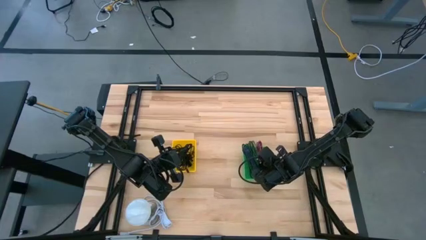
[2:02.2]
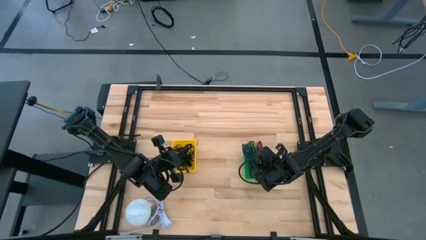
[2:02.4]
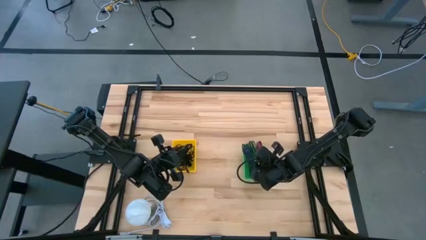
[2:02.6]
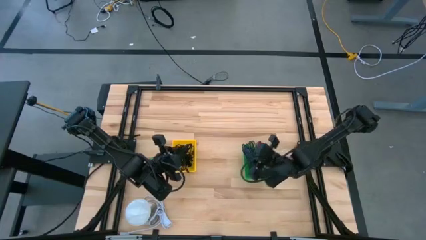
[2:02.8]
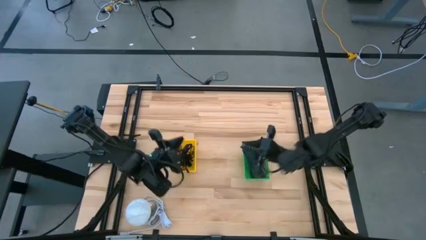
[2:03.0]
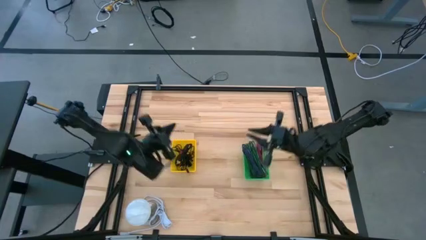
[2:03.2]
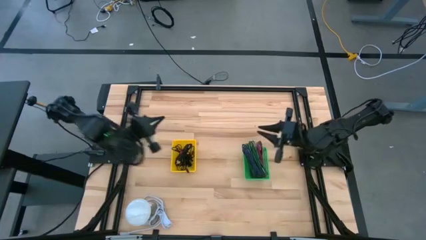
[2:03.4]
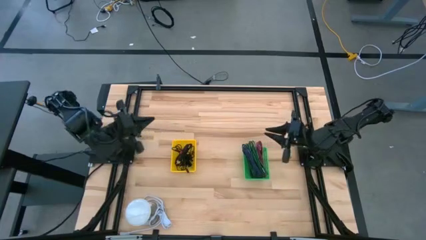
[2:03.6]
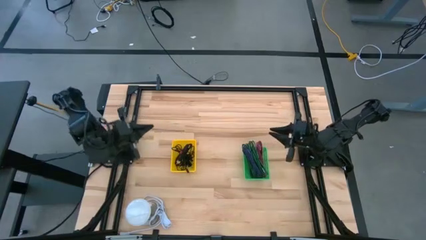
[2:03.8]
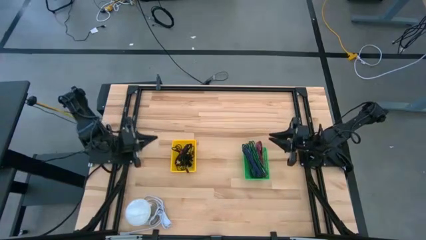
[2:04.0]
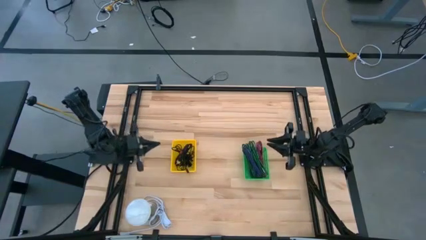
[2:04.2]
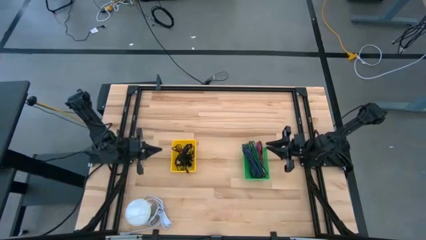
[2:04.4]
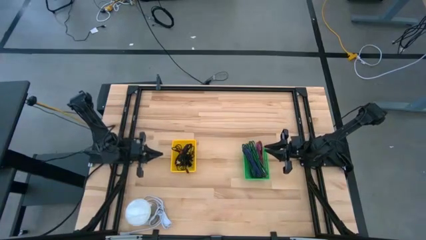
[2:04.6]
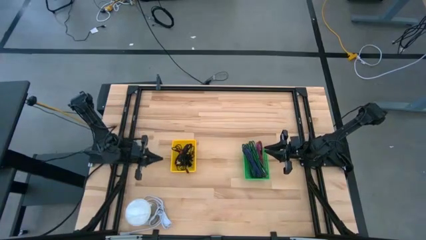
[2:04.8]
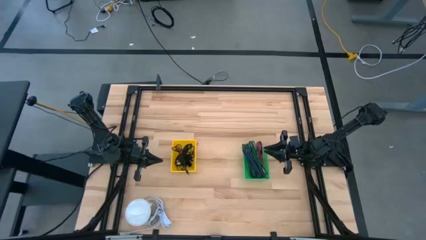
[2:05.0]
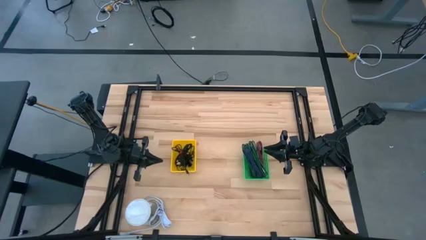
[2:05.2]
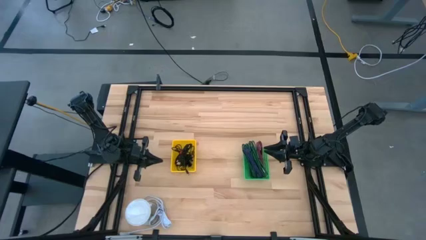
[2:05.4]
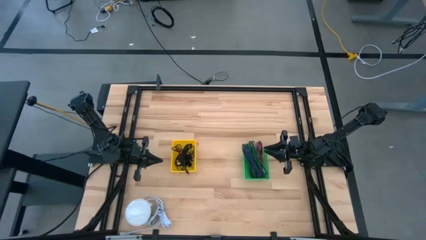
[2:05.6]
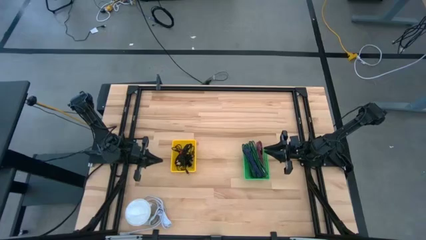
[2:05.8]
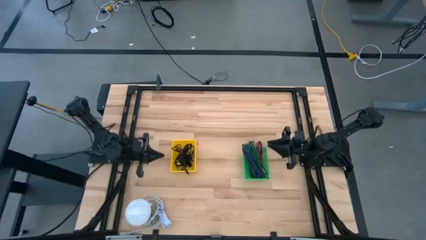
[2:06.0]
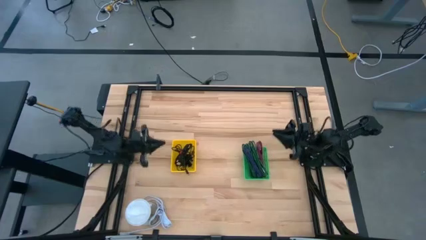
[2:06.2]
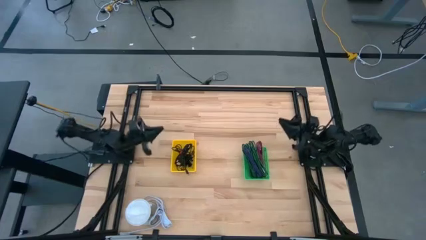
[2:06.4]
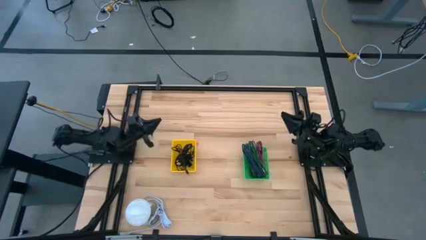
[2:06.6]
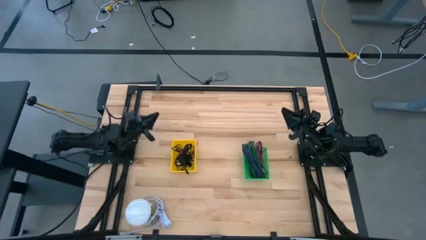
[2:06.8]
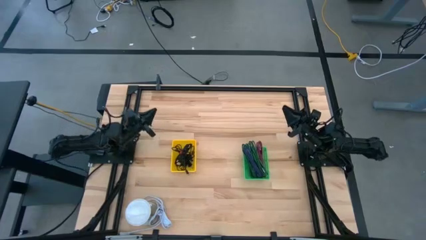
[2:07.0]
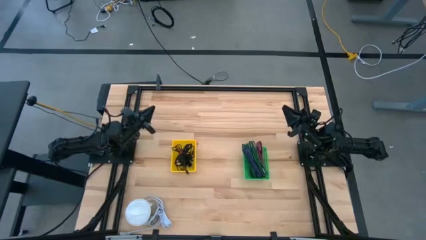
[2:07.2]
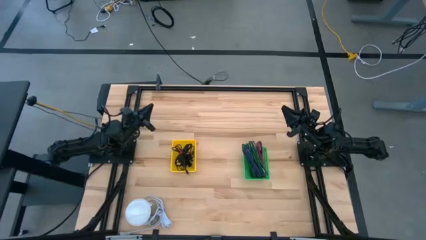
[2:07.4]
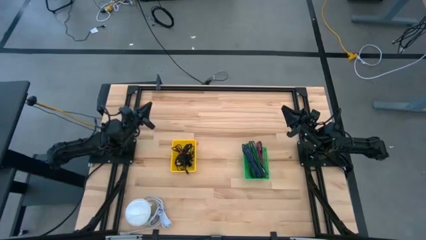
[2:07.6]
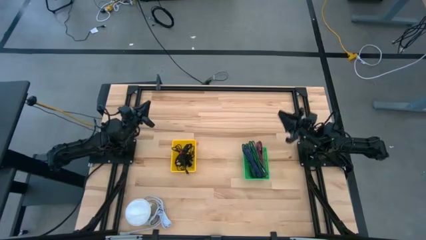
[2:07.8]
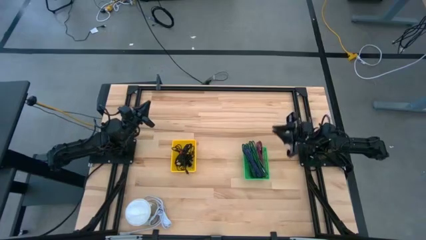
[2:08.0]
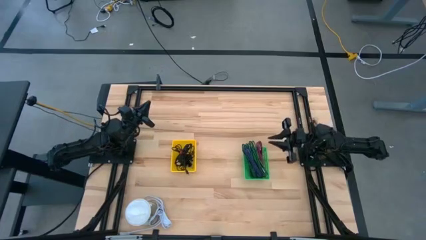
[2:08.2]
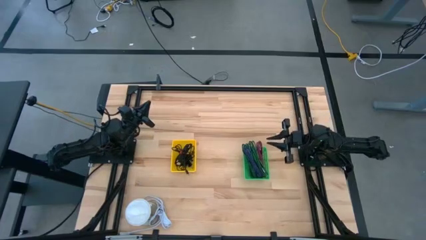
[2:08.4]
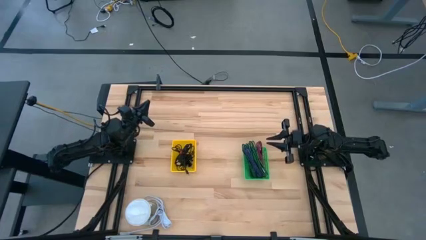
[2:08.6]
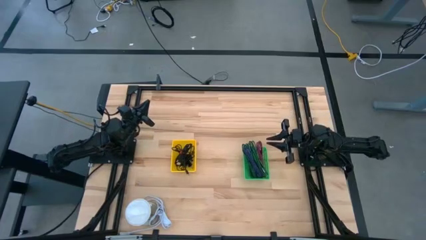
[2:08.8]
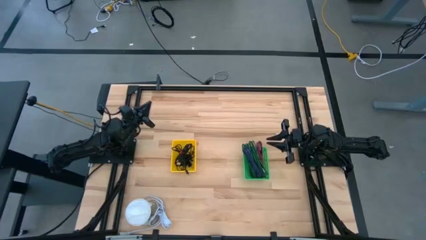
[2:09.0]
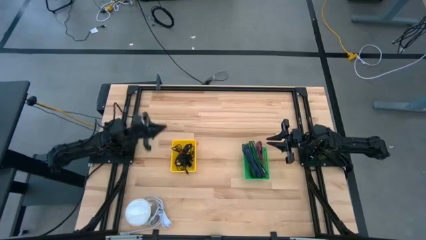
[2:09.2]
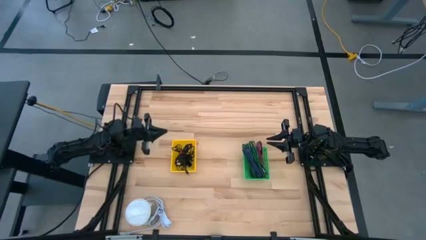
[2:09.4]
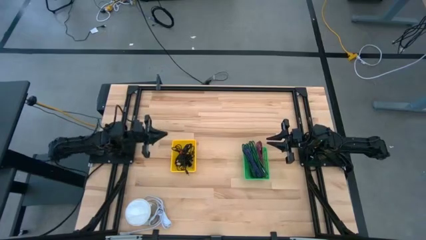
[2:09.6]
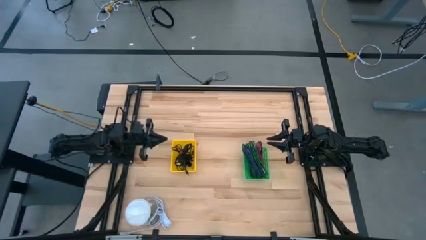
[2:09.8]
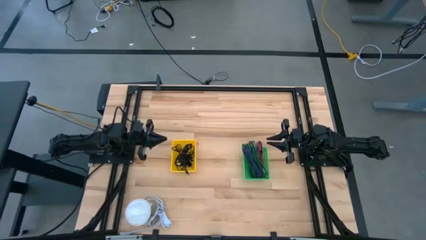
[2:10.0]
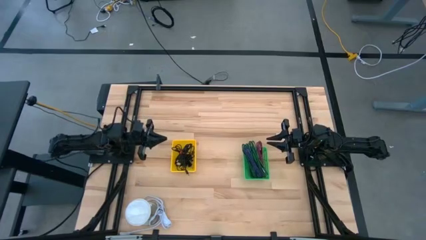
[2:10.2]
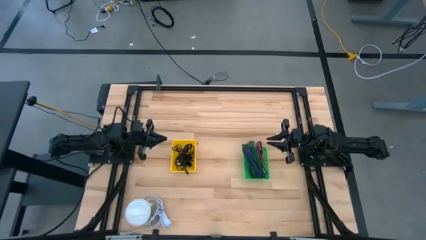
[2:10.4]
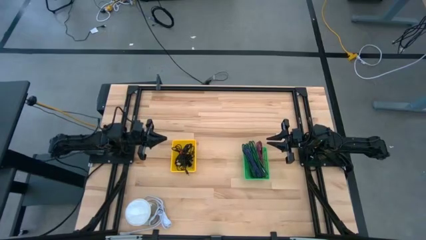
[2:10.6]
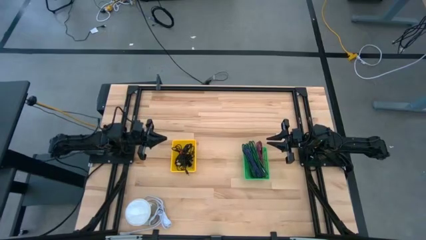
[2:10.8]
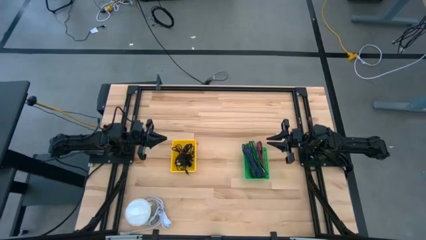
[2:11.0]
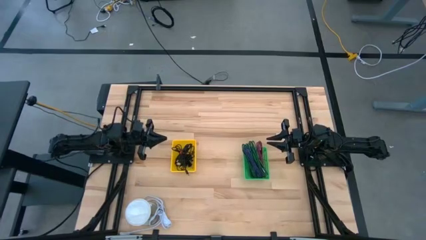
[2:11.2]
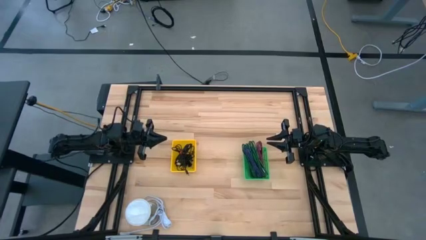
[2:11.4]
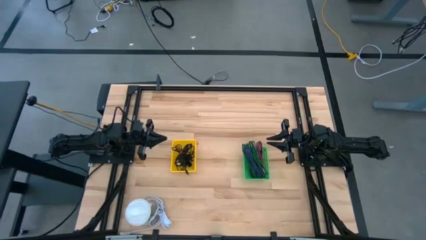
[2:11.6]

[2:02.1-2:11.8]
Task: Pick & Place USB Port
Return to Home Position

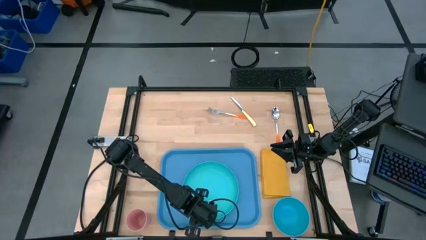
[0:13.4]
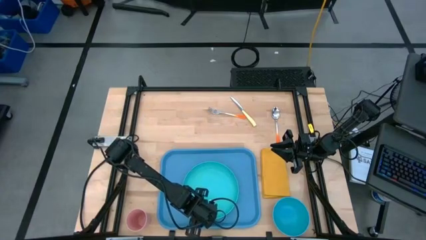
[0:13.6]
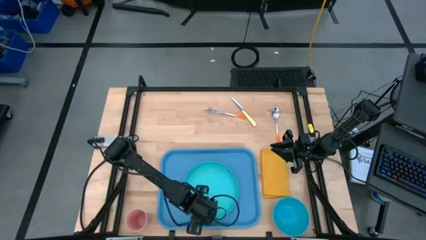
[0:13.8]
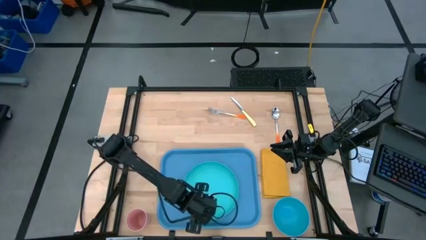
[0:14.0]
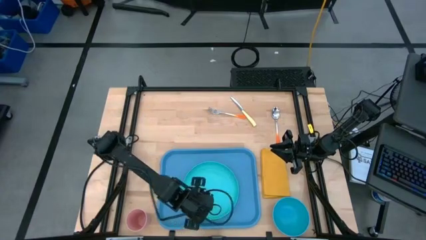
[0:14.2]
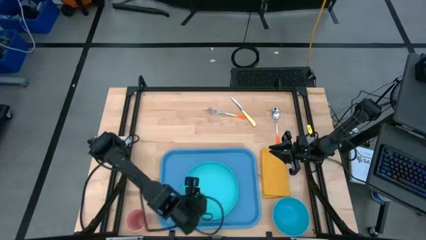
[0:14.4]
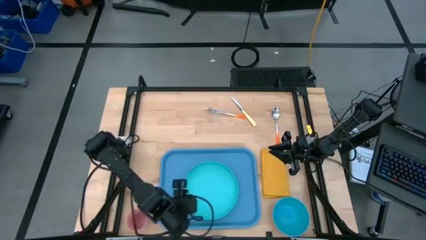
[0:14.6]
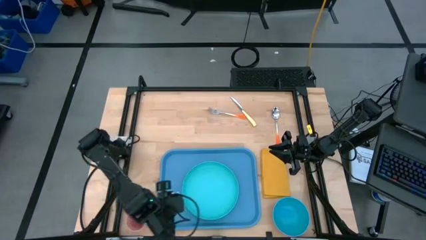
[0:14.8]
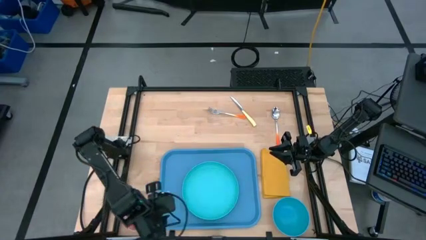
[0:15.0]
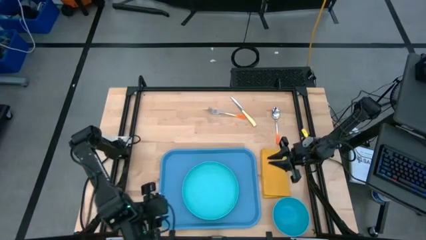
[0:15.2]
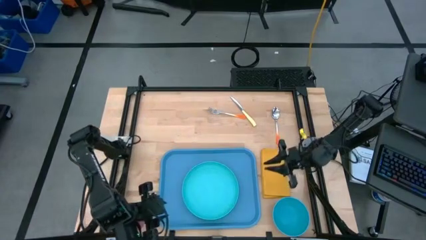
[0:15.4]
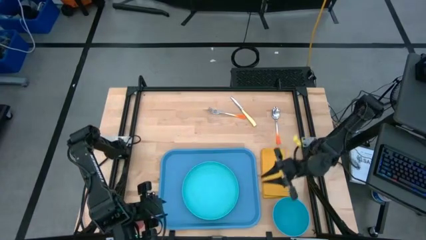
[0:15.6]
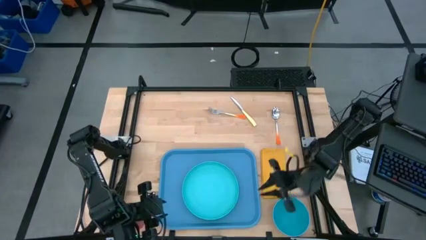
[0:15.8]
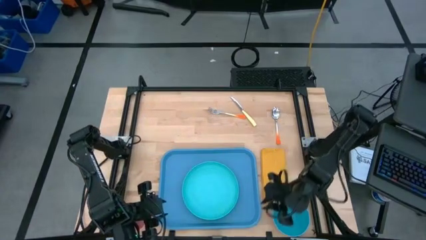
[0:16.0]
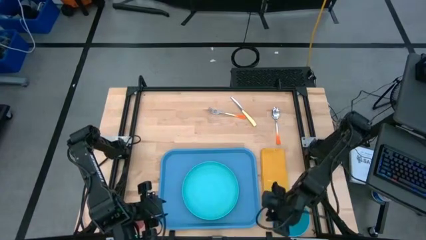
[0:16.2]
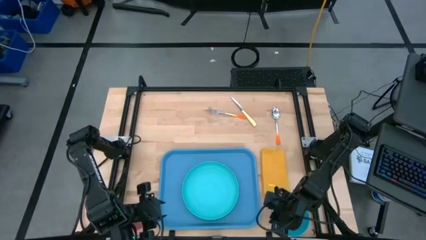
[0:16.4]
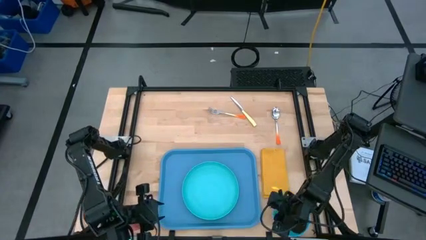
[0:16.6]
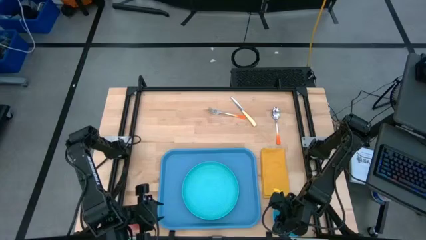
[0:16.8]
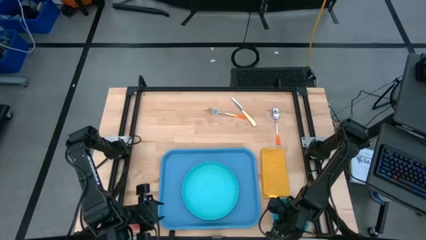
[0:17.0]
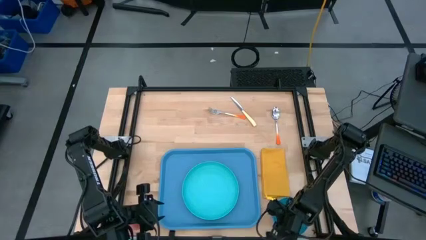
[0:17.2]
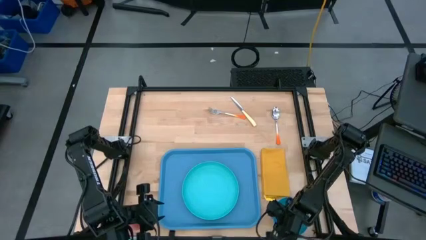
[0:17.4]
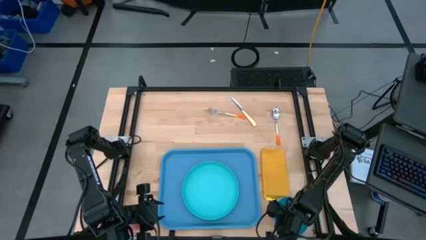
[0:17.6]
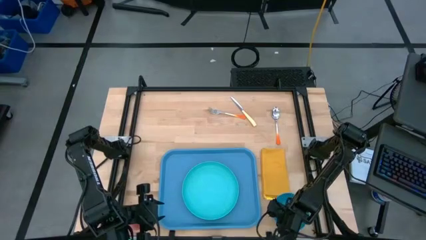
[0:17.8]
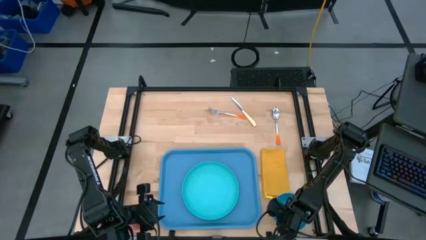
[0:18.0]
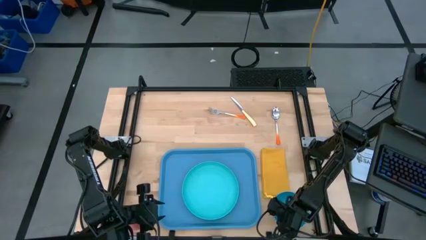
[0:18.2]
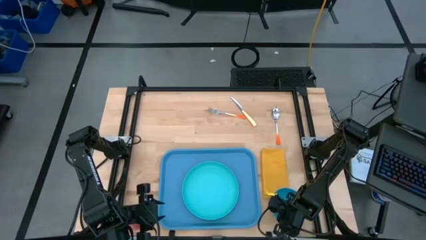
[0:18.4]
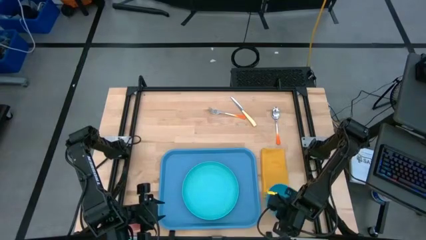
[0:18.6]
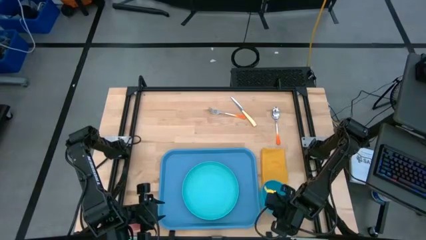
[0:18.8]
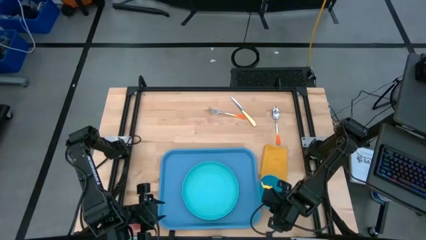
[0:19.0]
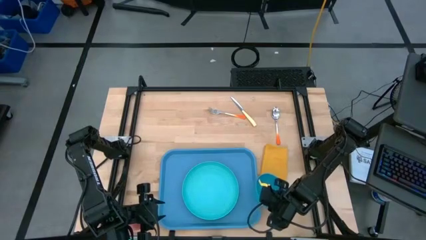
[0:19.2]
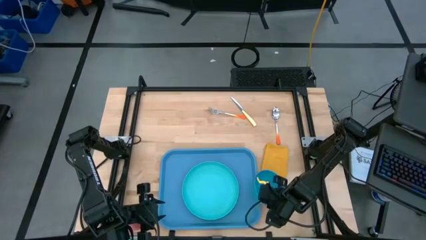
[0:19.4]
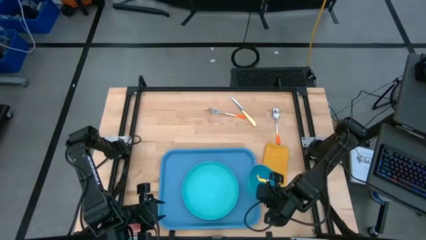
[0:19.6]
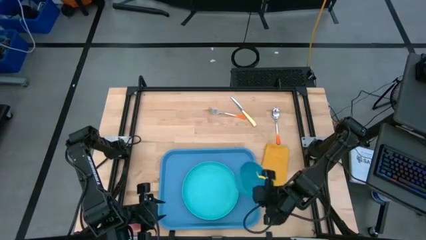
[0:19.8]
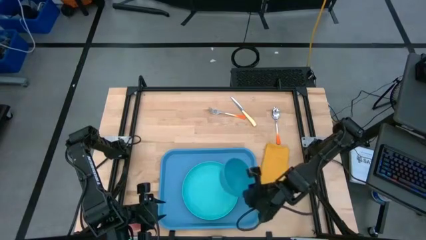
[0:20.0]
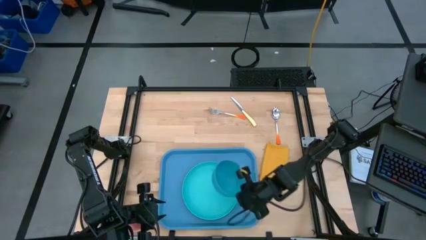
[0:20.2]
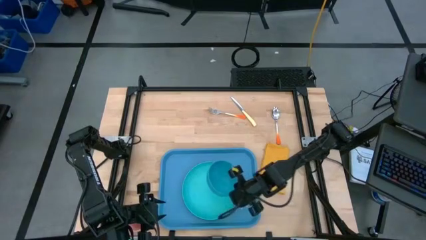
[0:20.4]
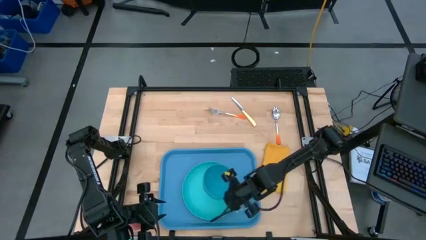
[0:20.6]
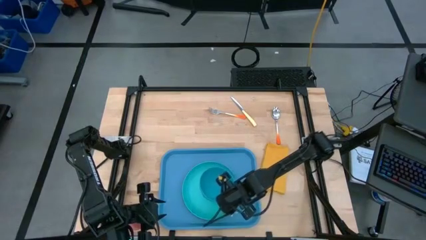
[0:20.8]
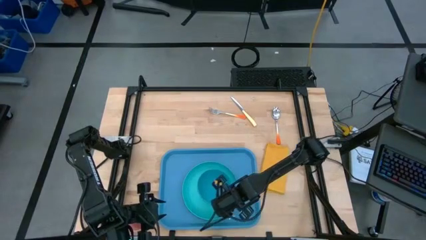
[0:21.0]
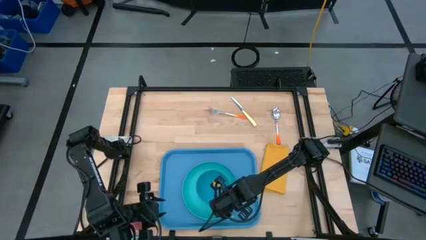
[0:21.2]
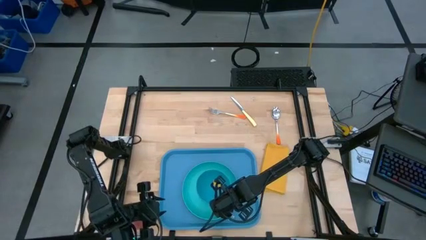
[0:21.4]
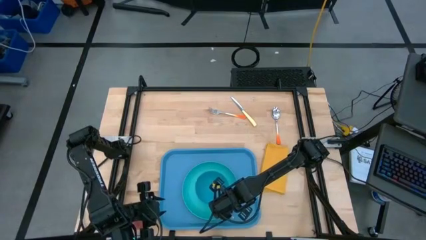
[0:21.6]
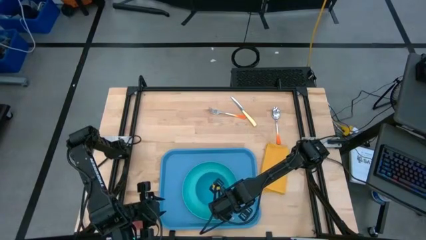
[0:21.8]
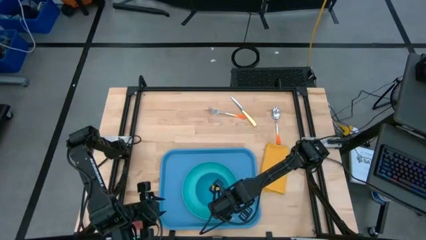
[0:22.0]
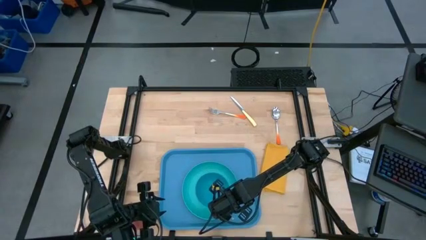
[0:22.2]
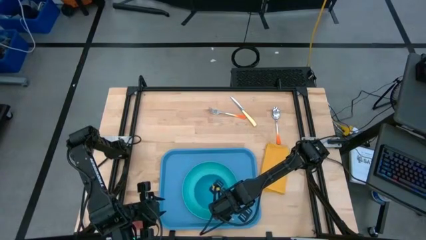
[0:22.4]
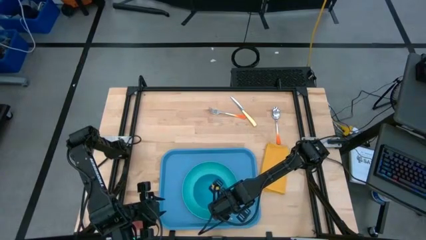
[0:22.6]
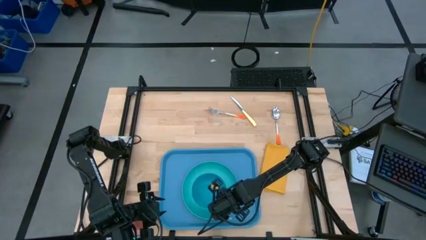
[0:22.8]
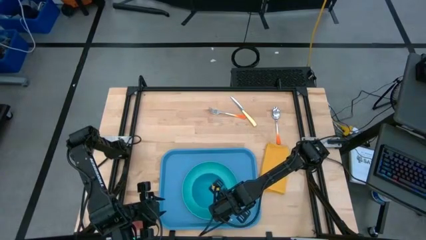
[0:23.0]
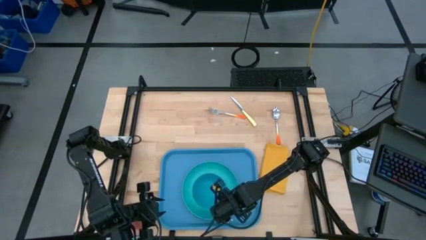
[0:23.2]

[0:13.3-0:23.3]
Task: Set up tray
Put the blue bowl on top of the green plate
